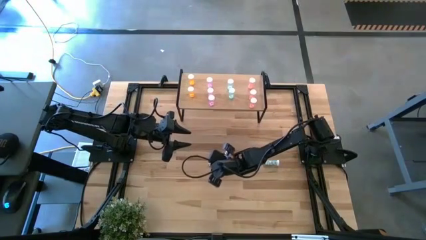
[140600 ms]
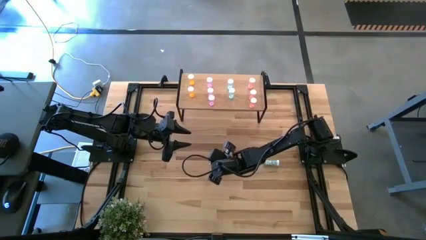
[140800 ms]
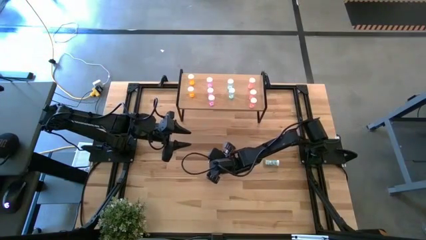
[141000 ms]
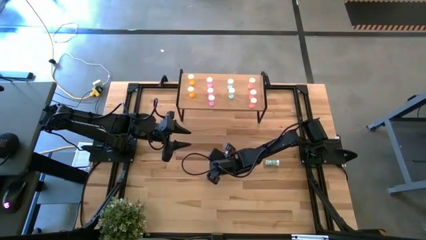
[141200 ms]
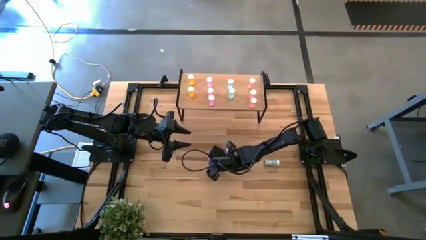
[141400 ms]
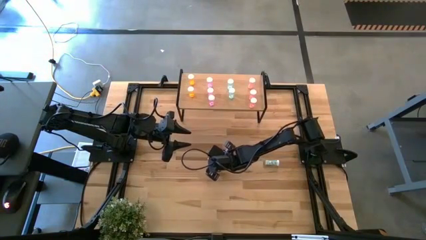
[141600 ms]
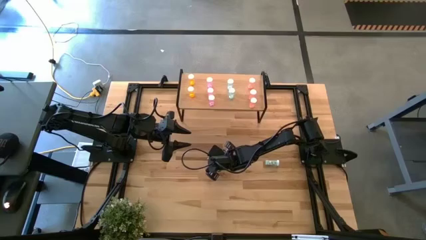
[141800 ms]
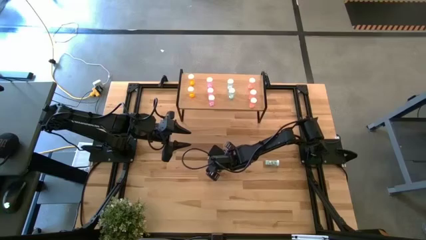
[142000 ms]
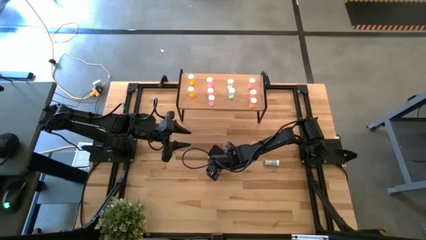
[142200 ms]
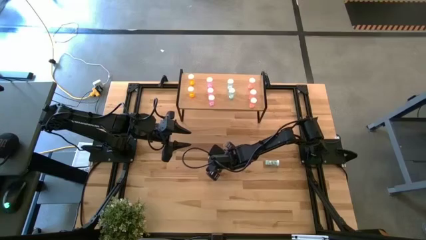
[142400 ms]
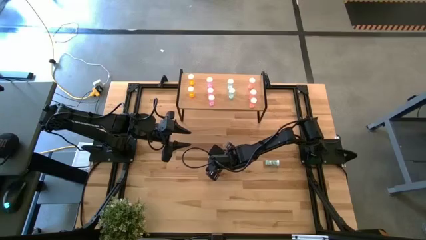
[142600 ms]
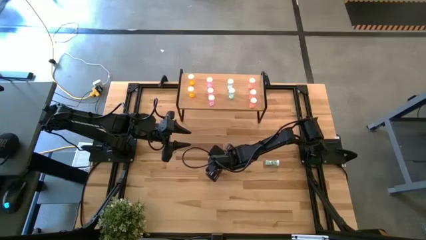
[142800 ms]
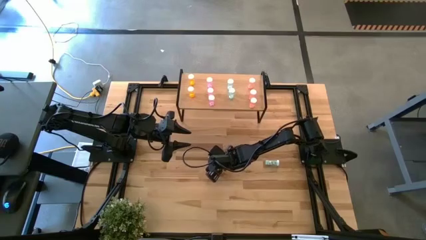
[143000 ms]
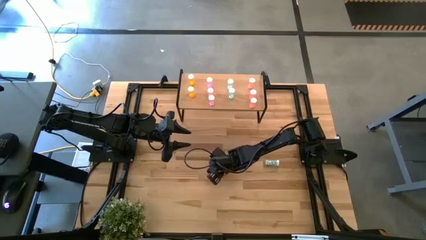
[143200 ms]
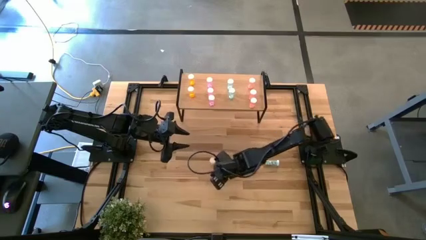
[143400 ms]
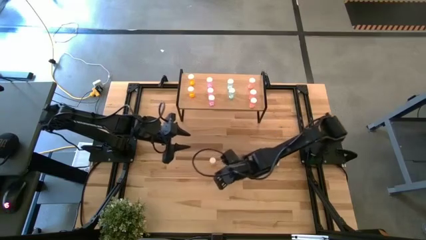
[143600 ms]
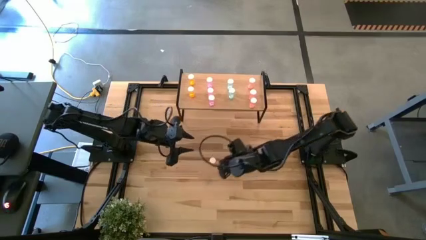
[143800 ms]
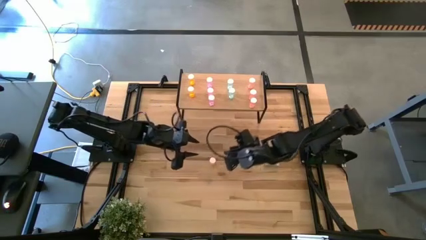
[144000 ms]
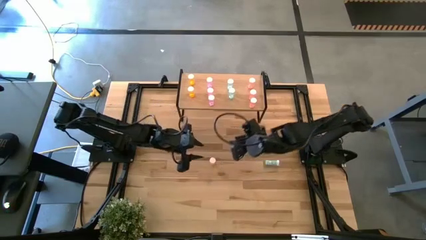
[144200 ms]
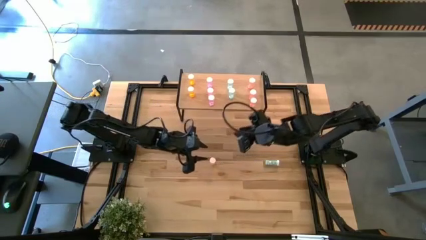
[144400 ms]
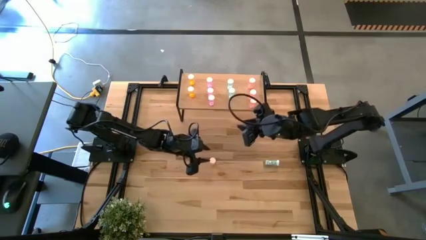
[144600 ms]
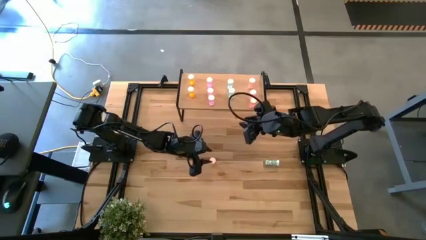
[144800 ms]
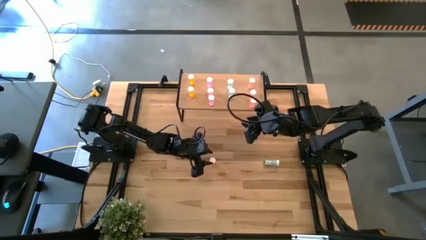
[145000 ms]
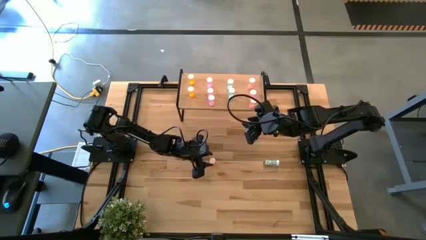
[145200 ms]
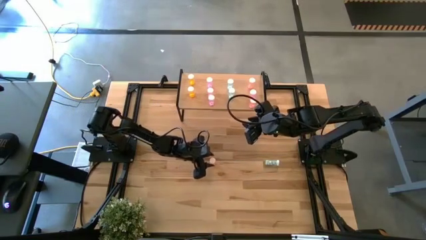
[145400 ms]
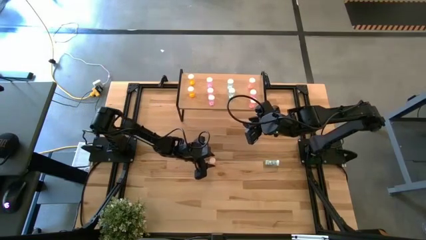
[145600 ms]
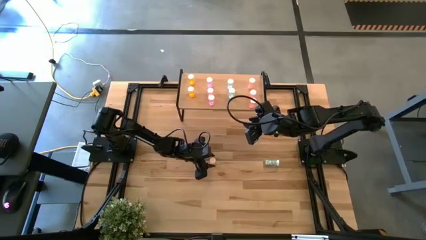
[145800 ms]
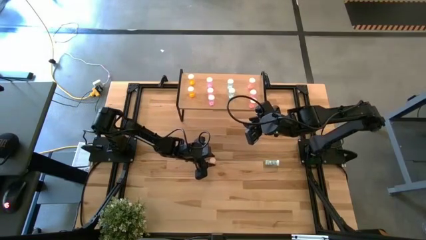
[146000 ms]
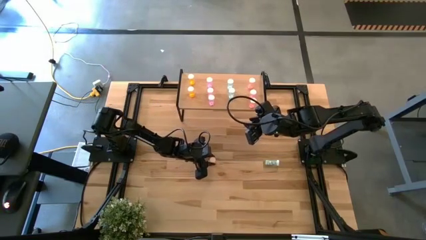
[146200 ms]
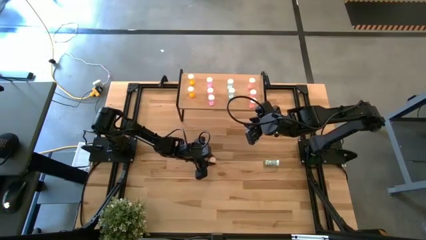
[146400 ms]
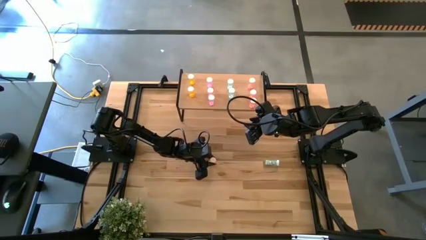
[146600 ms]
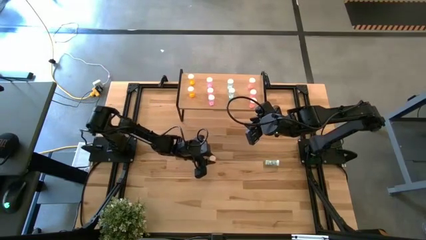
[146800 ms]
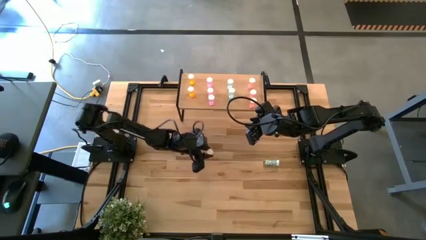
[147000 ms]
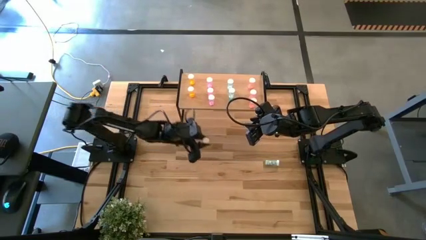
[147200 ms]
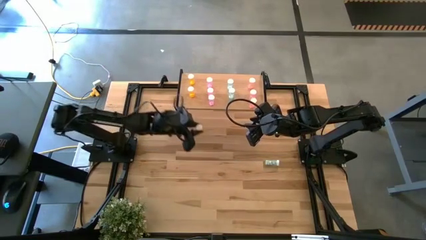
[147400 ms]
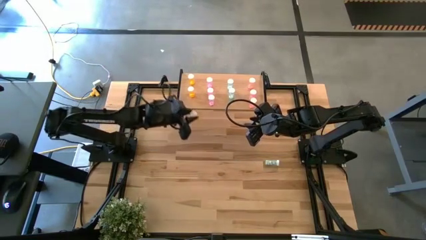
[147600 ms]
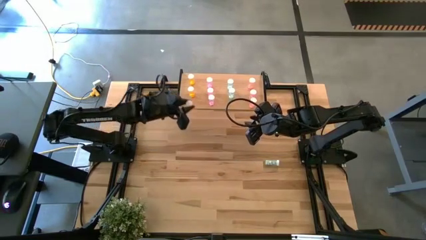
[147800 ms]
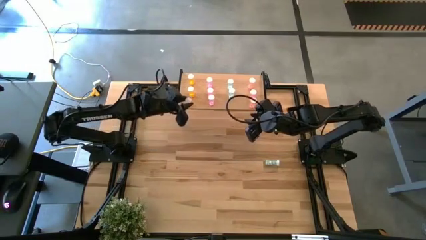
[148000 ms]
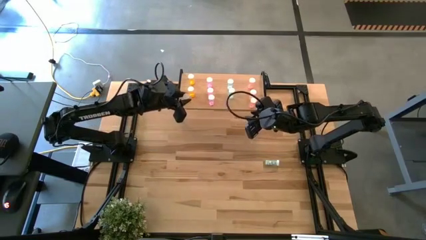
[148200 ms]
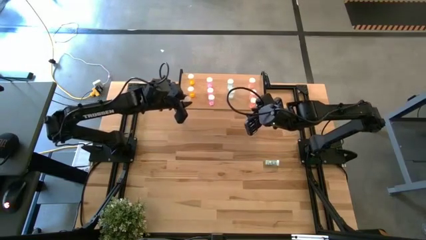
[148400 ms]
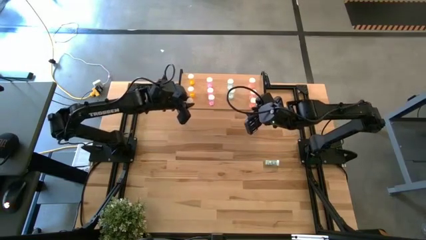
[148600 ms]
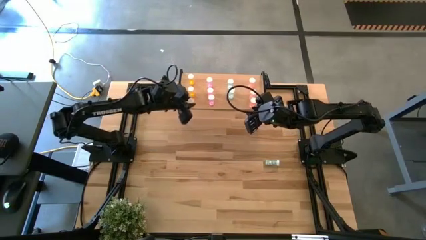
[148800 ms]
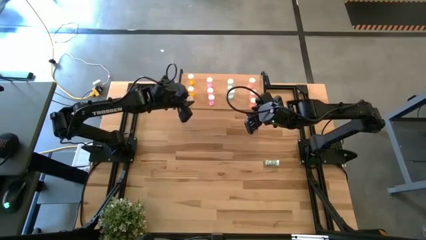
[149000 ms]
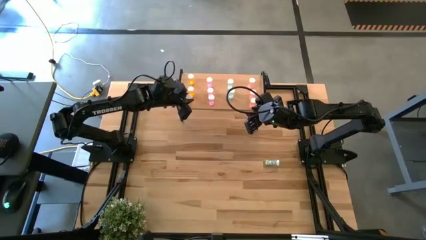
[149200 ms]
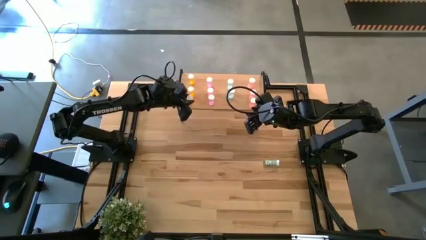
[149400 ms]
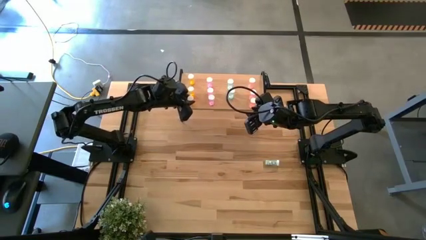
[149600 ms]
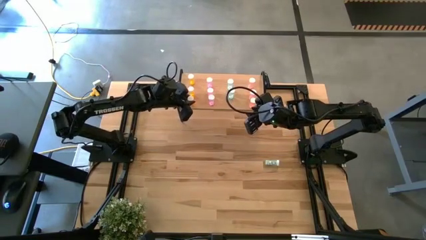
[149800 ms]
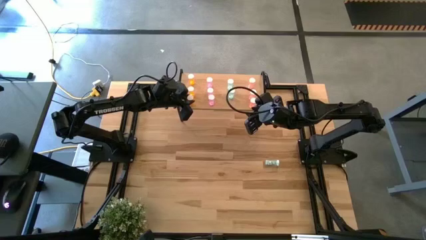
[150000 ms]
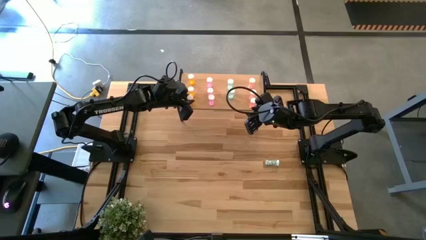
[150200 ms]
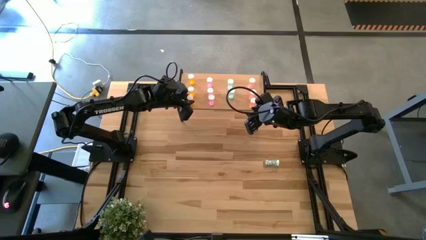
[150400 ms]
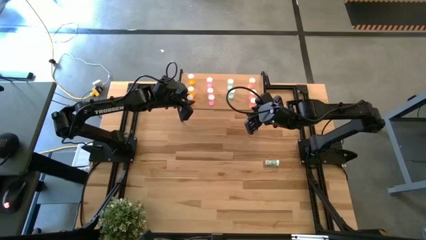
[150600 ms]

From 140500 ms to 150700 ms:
Task: Pick and place medicine bottles onto shelf by color
Put the orange medicine bottle on the shelf aligned with the other orange medicine bottles

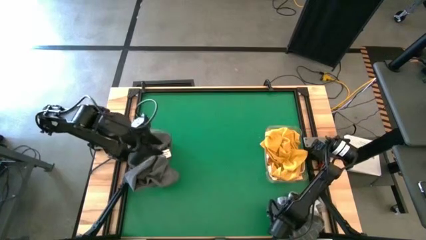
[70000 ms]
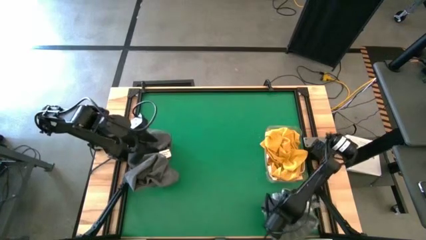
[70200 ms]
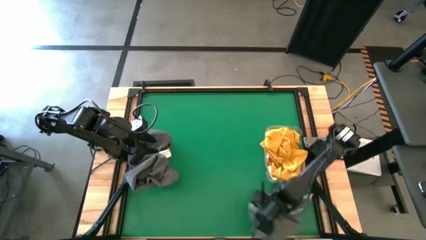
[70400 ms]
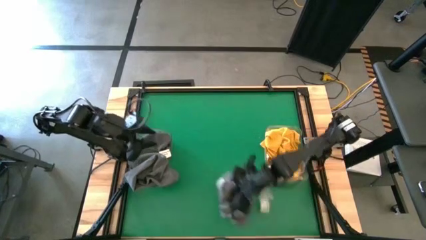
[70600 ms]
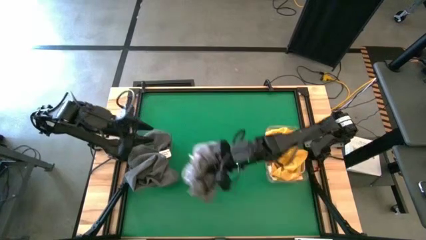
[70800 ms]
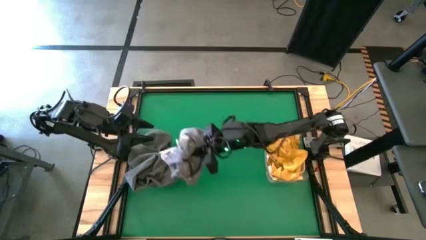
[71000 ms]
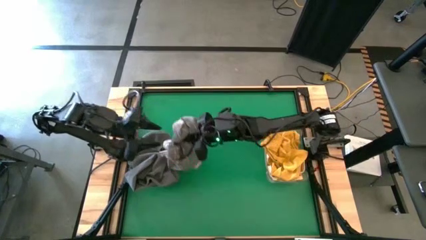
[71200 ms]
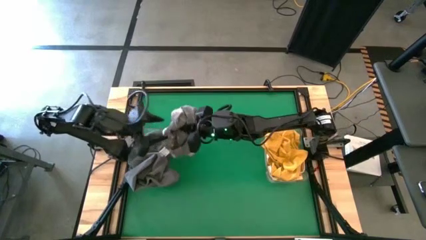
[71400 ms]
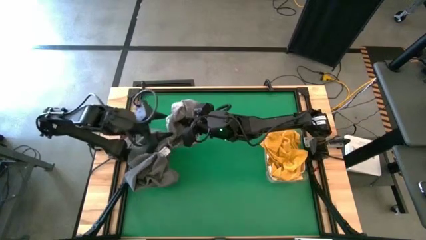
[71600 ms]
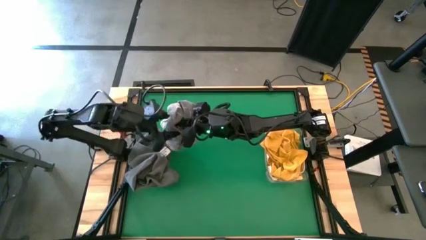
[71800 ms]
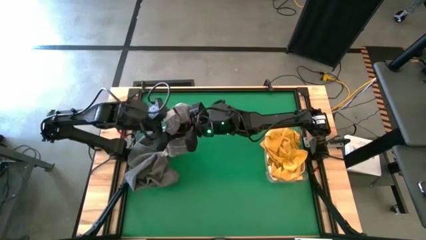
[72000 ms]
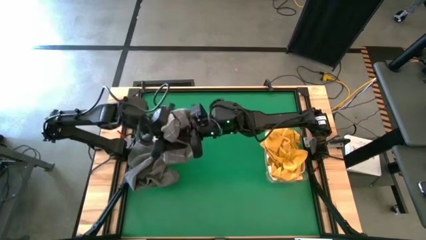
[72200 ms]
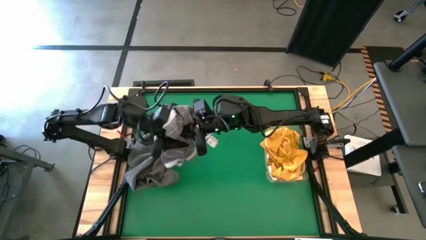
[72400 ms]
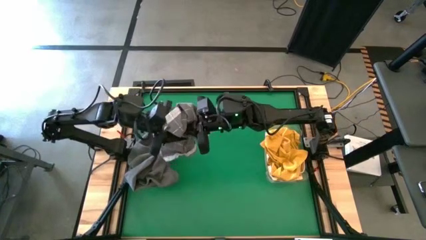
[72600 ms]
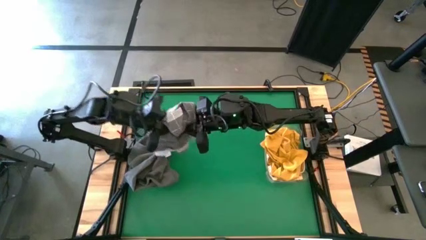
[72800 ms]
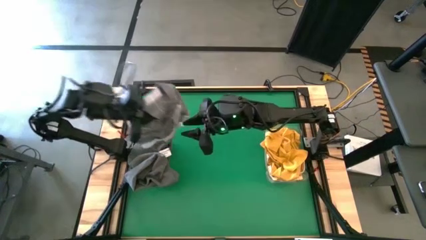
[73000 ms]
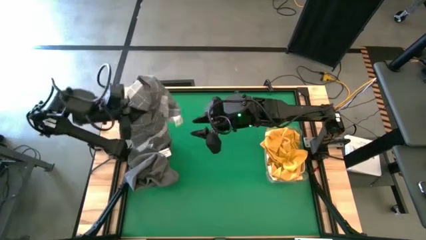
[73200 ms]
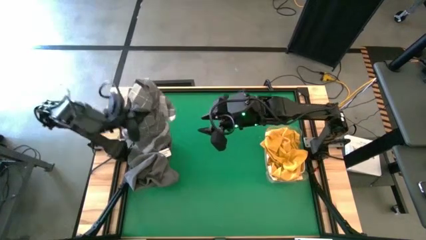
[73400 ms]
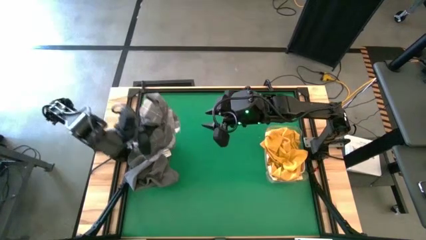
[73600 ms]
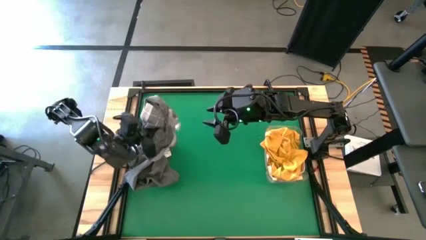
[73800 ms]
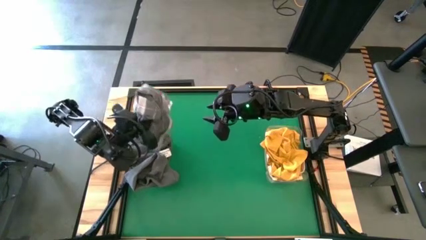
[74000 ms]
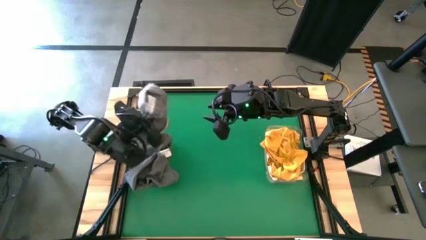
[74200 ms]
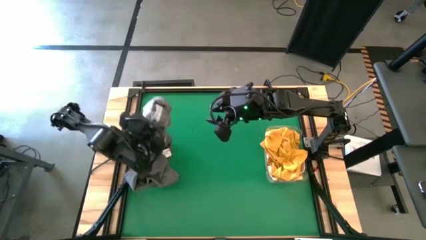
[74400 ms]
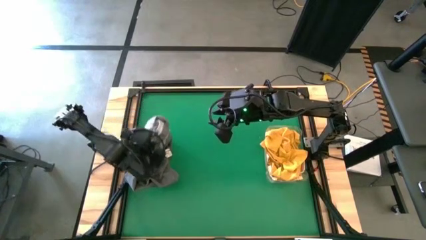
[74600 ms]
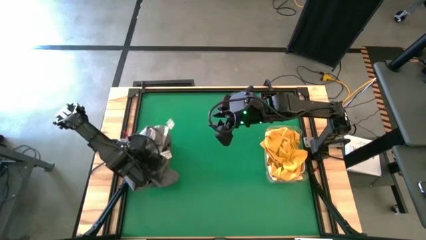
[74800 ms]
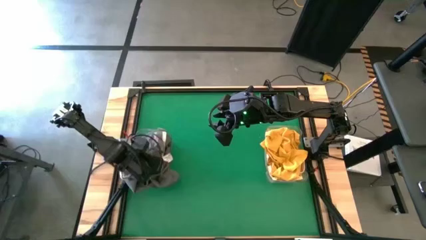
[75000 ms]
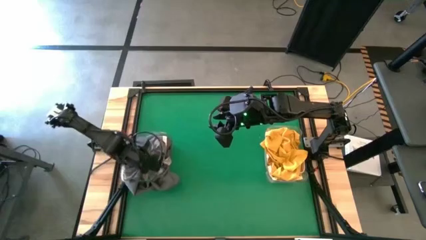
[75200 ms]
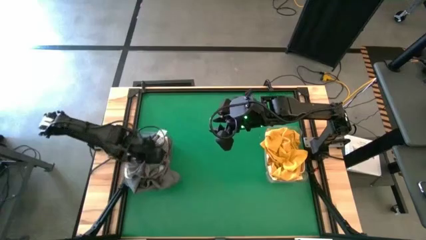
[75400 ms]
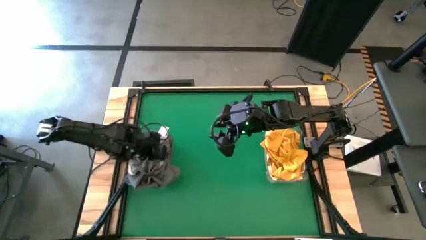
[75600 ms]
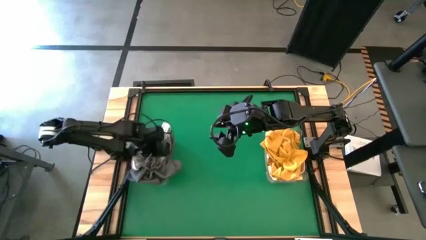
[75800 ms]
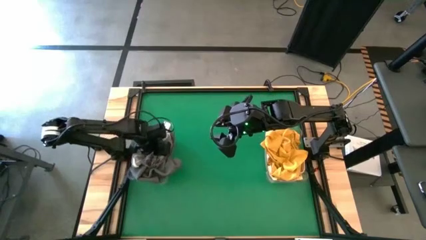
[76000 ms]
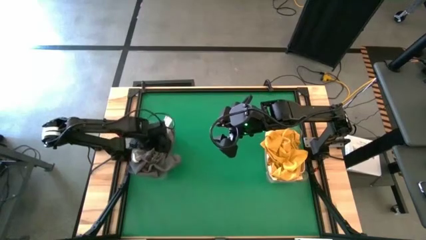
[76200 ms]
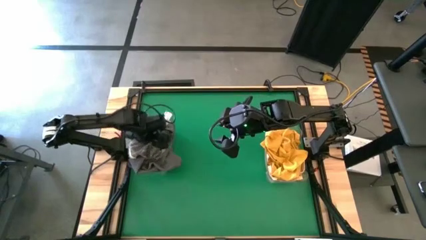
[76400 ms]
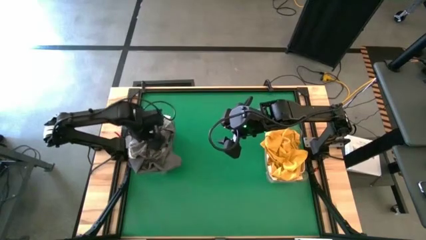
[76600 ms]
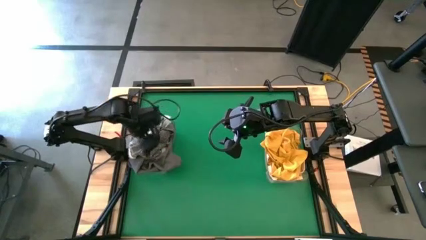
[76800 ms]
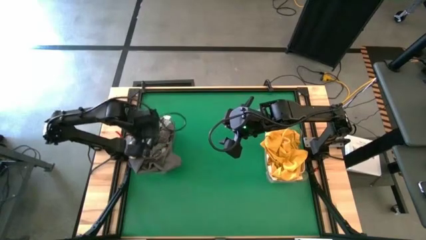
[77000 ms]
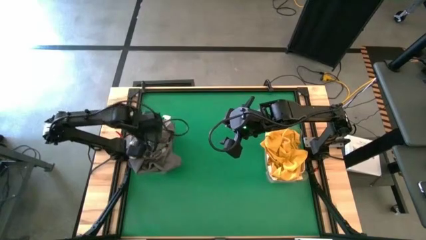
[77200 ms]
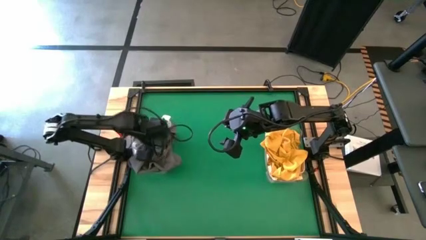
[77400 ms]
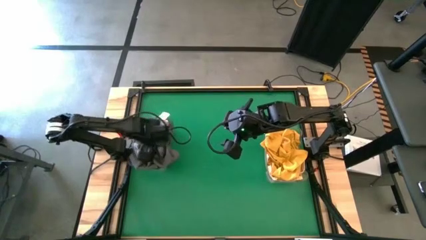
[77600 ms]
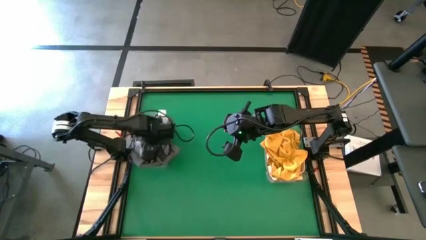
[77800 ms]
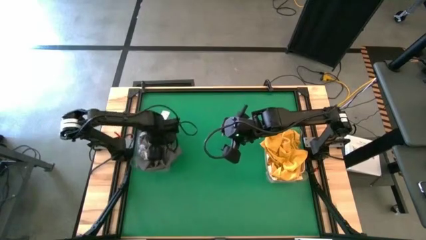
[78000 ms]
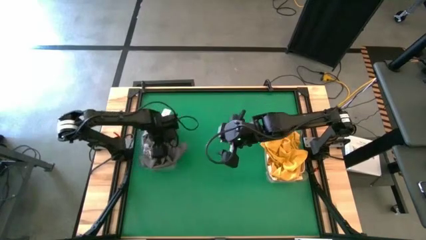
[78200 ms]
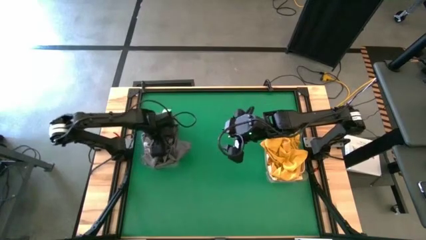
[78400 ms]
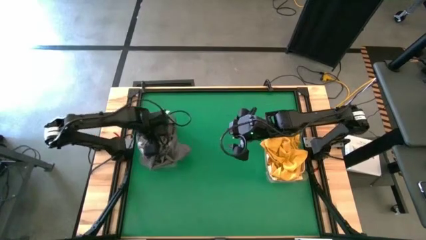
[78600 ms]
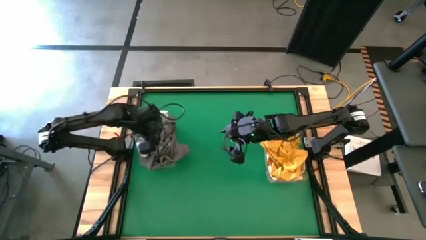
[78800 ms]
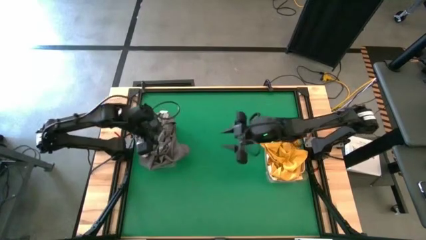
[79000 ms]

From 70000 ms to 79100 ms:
Task: Sort microfiber towel by color & place in baskets
Put the gray patterned microfiber towel into the left transparent bin
